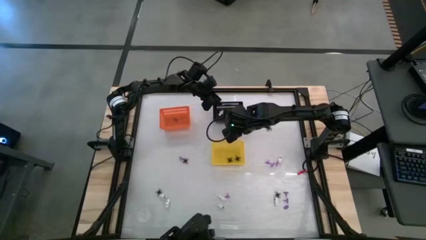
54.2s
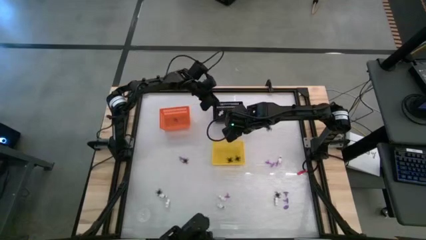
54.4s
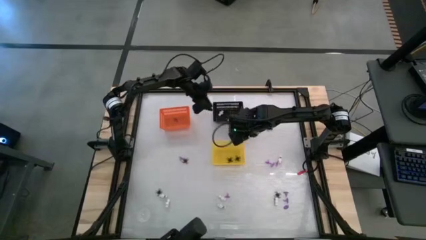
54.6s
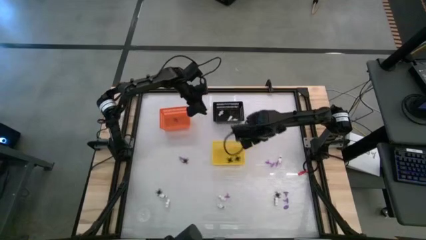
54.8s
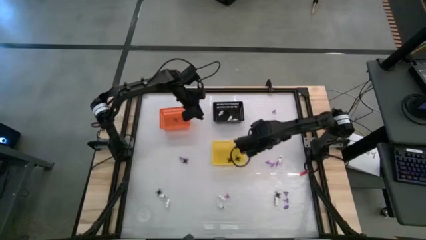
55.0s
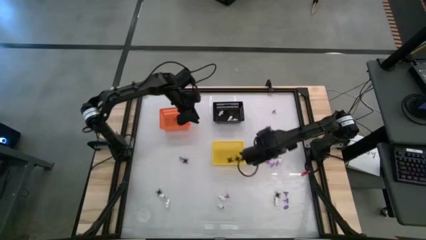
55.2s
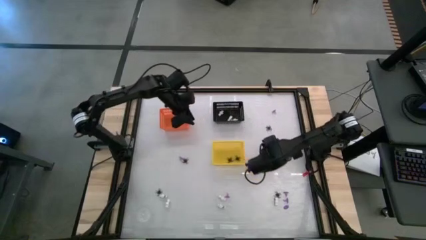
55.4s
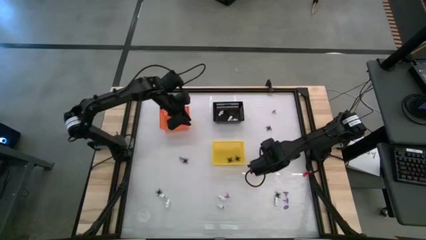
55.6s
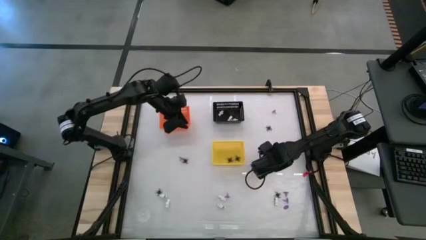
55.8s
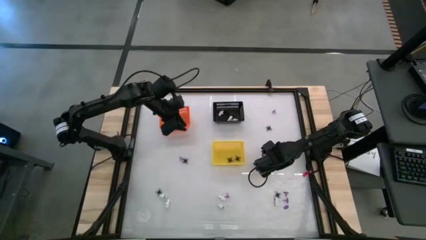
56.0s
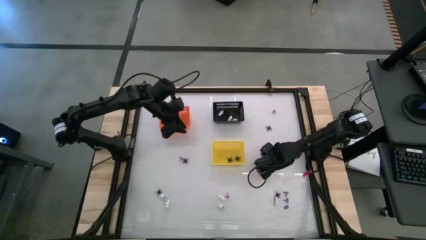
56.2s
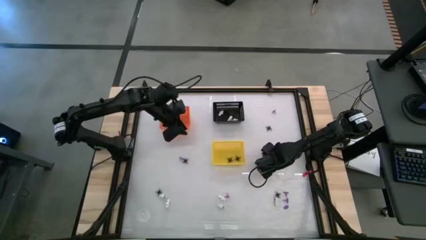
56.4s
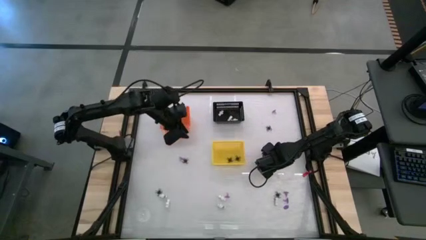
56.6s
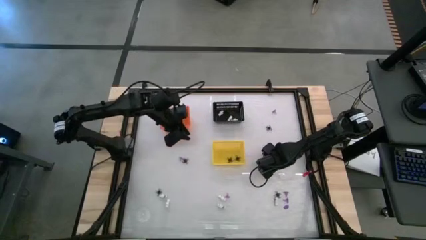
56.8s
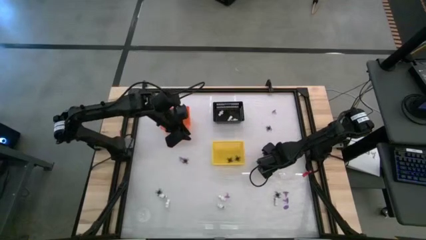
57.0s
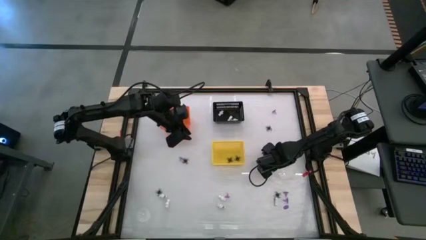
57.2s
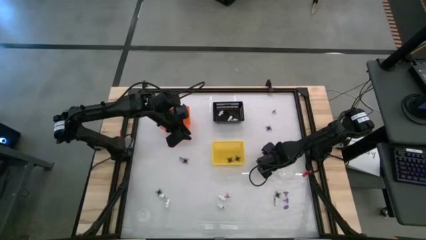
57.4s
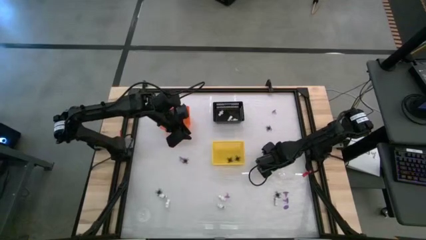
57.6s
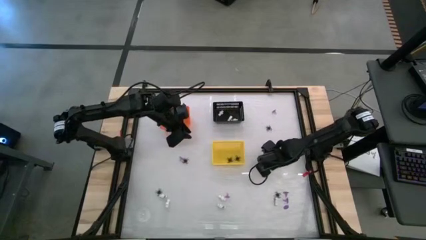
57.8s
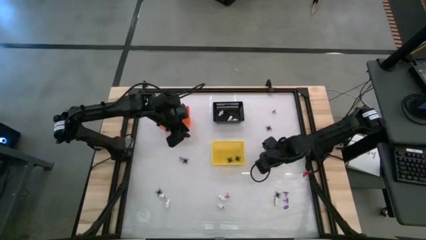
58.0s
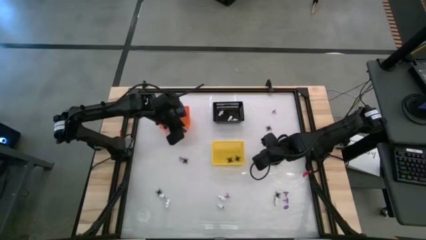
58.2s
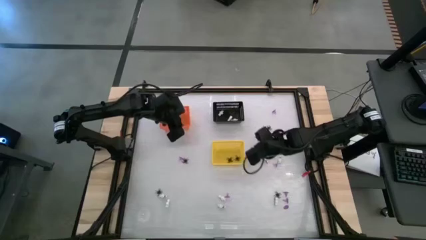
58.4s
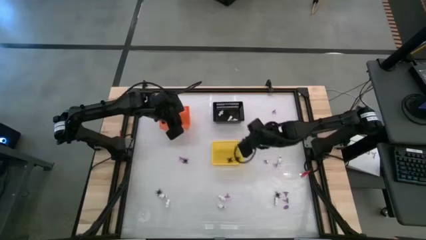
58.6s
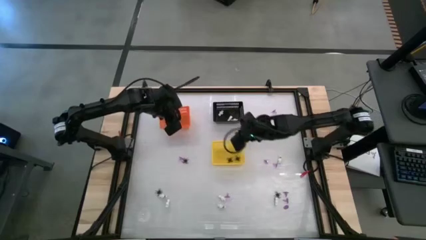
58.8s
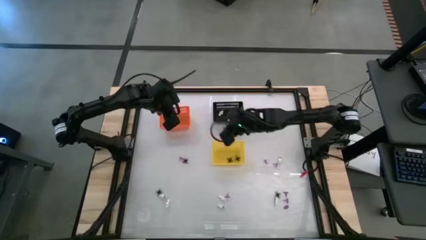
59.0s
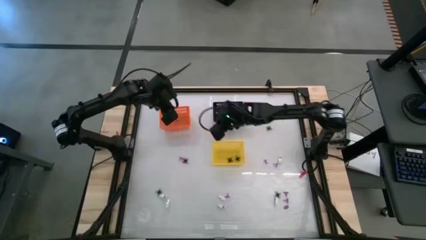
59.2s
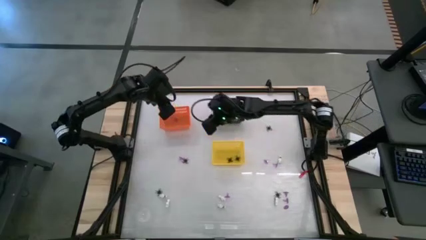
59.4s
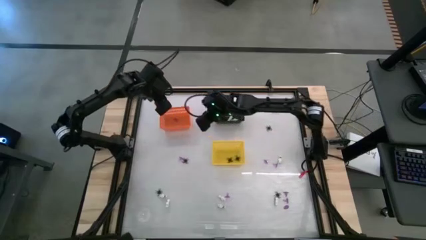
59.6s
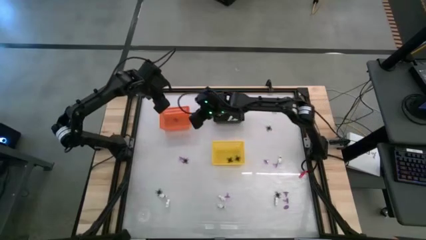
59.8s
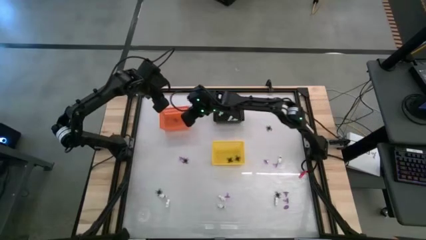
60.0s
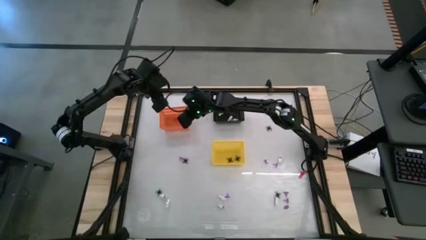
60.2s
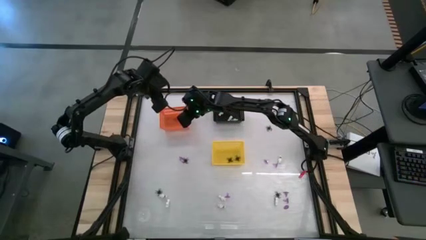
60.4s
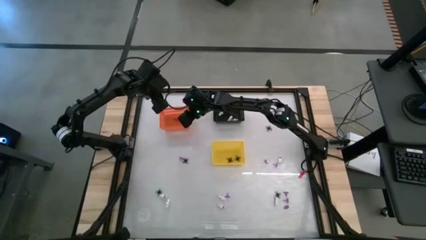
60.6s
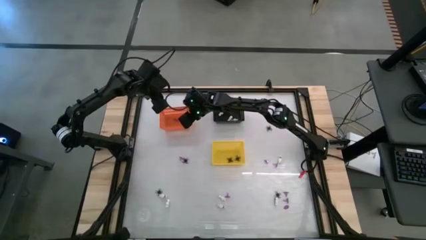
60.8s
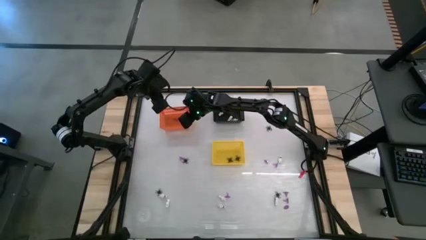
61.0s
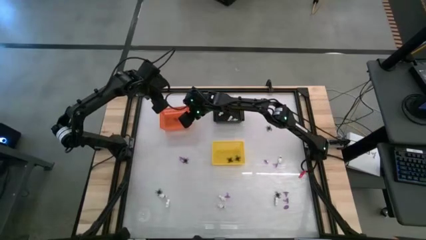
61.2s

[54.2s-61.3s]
Task: Sort Halloween decoration
Put the violet witch hat toy into the orange bin

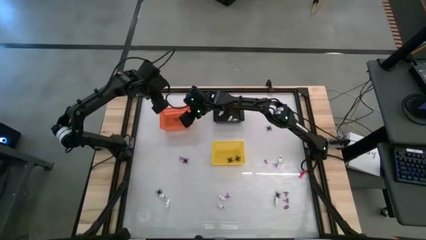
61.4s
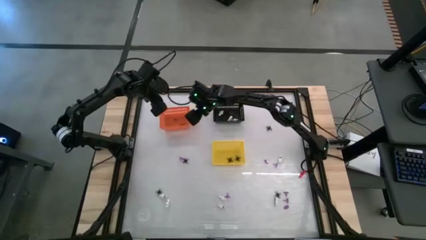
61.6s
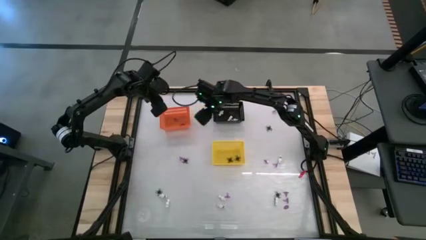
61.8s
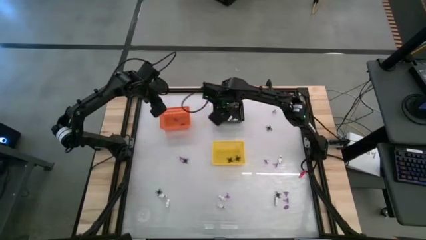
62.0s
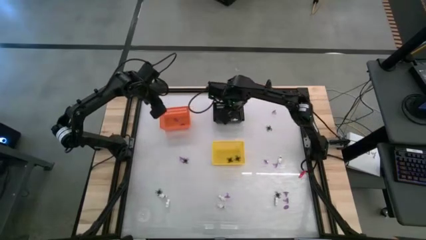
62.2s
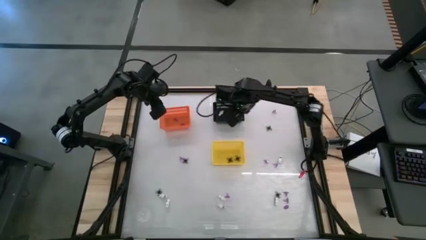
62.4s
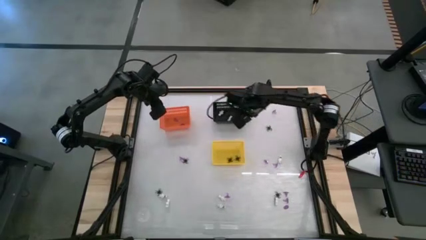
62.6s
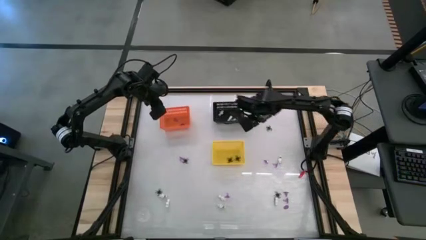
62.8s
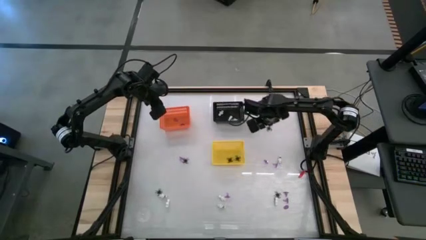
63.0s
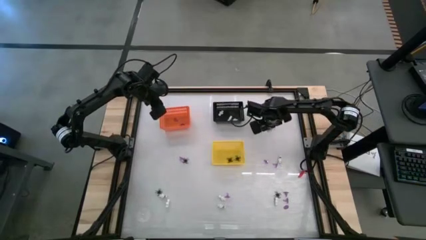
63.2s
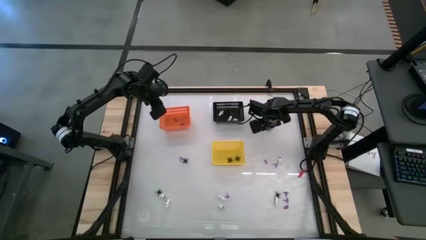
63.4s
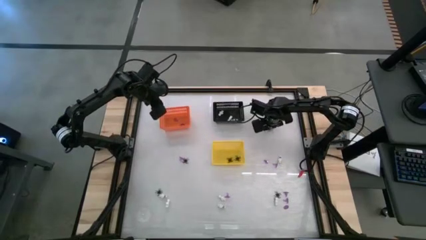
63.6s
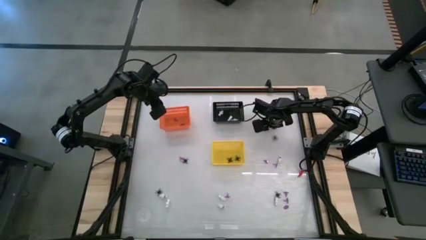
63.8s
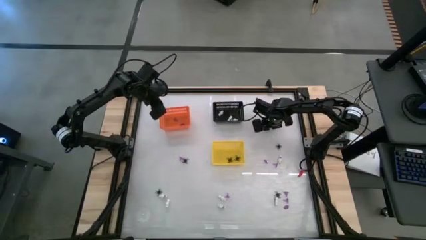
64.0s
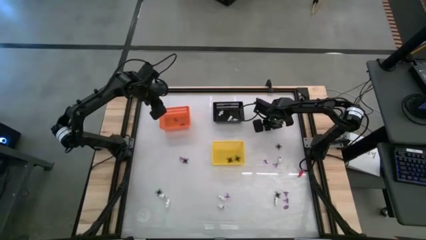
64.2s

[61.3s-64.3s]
Put the black spider toy into the yellow bin

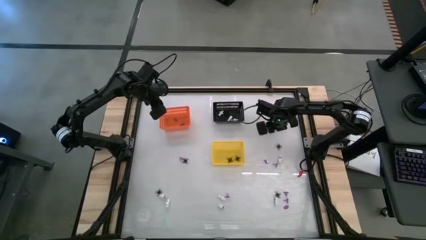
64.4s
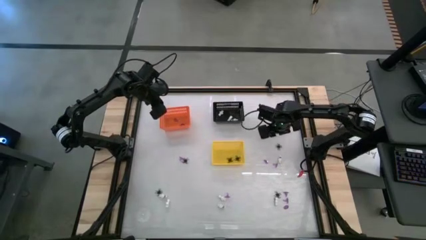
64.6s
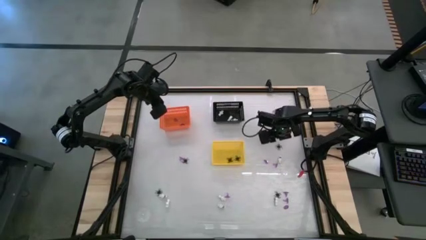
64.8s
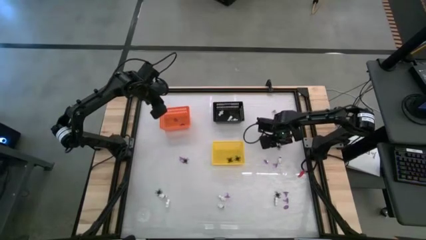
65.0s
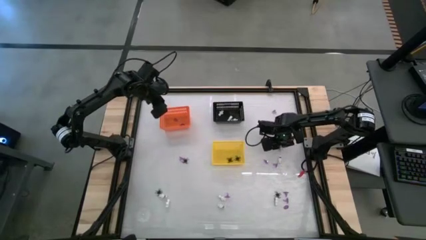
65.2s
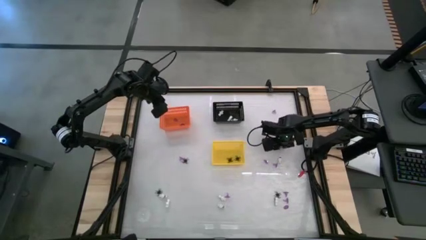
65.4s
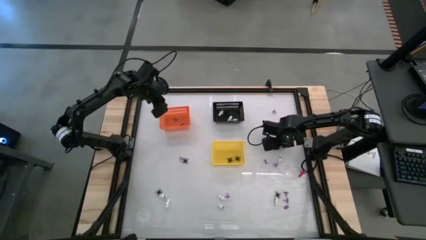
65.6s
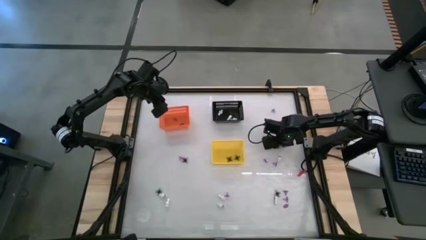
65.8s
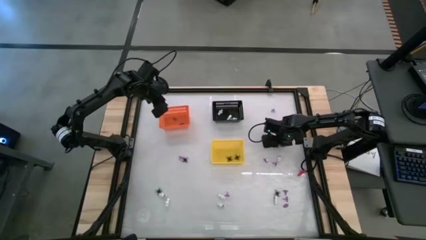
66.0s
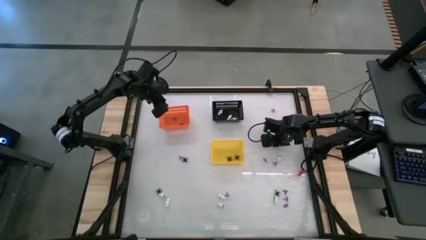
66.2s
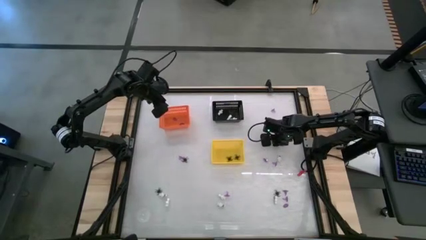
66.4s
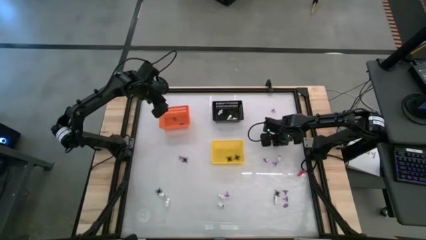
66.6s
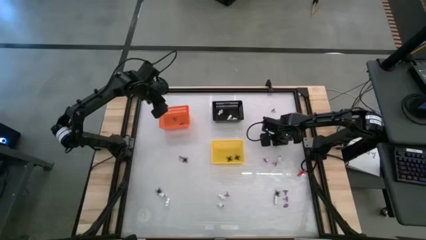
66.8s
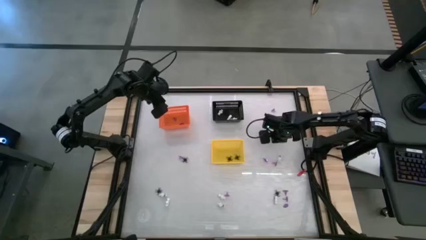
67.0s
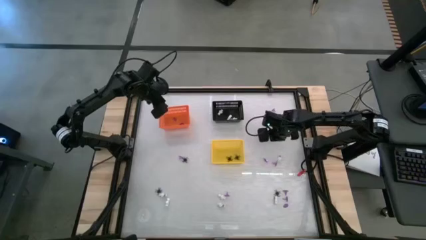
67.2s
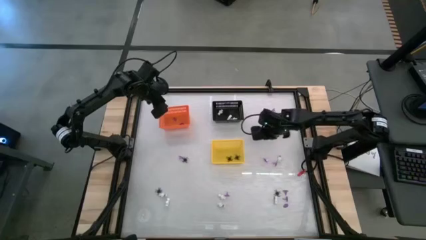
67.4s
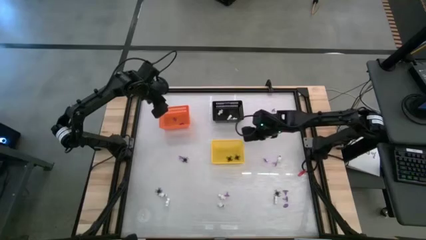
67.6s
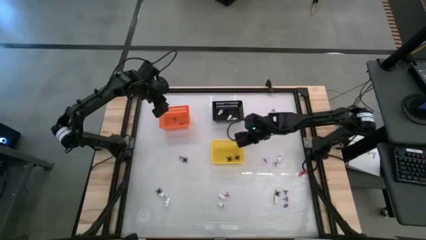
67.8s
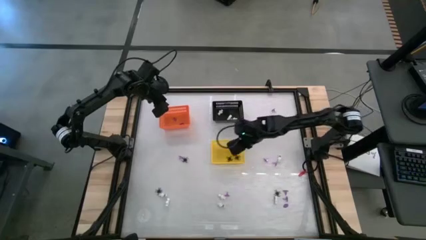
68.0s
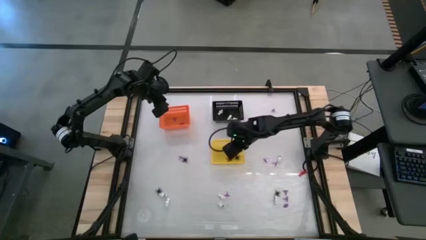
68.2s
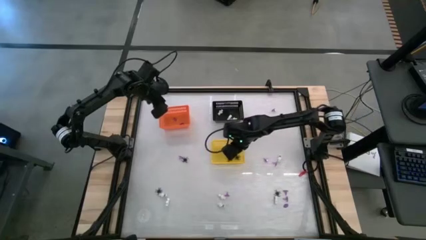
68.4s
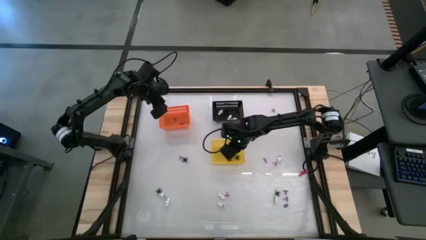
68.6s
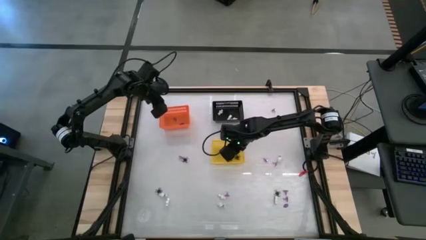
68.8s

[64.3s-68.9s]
Put the black spider toy into the yellow bin

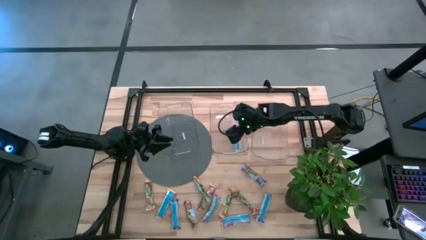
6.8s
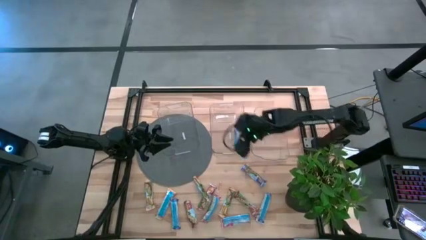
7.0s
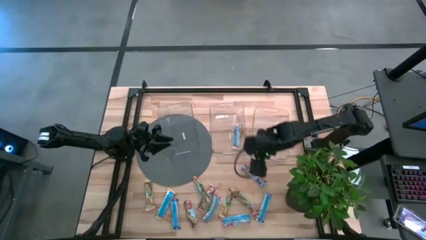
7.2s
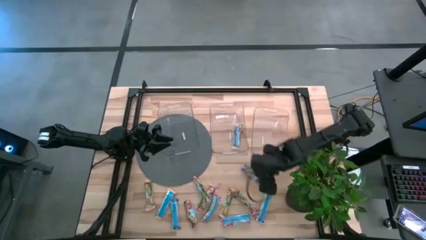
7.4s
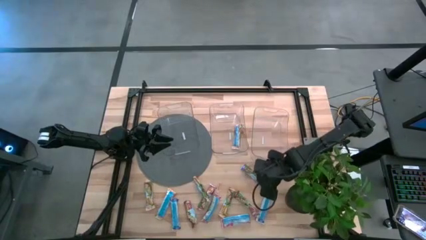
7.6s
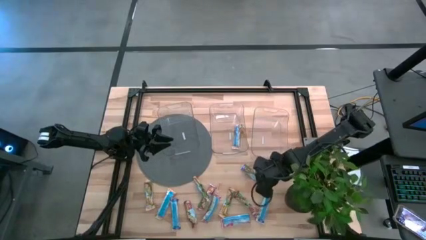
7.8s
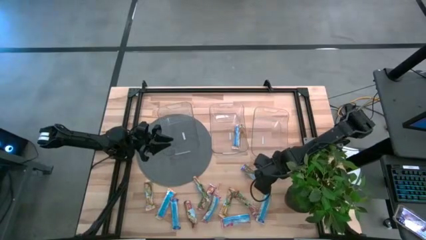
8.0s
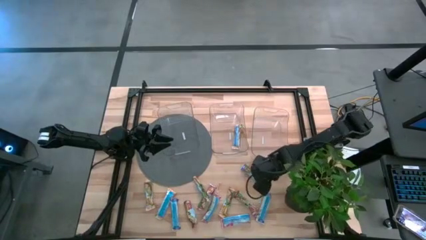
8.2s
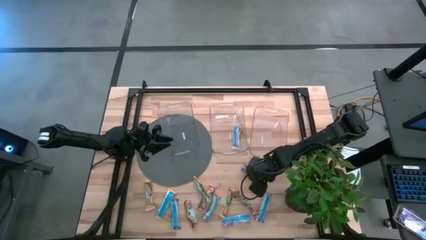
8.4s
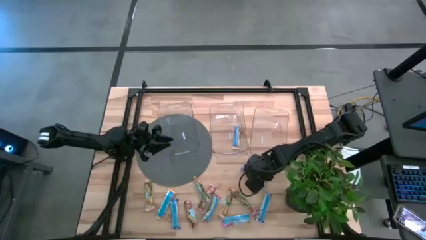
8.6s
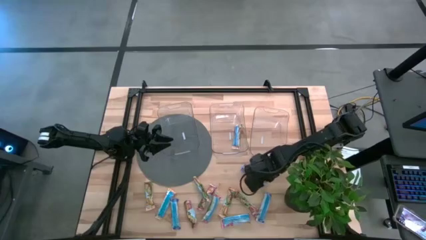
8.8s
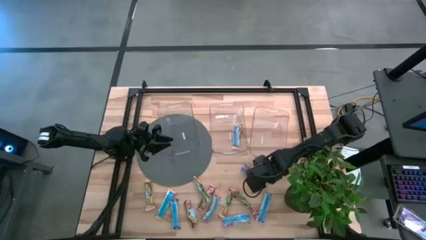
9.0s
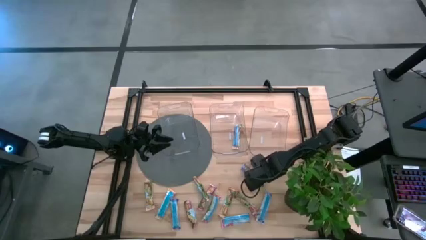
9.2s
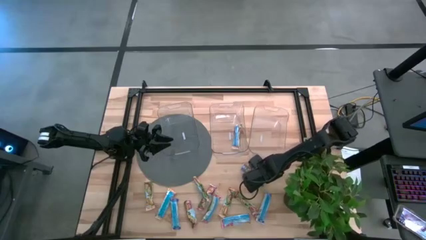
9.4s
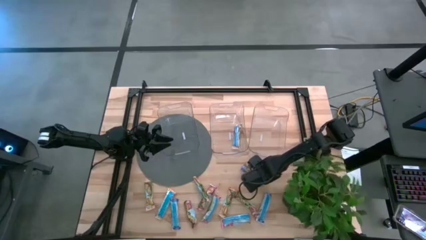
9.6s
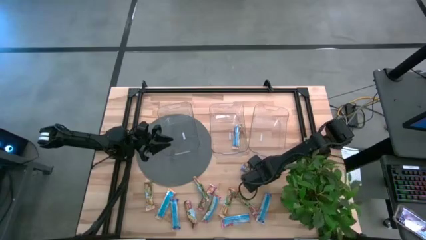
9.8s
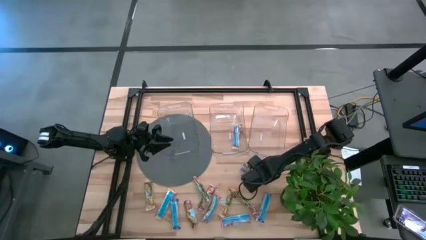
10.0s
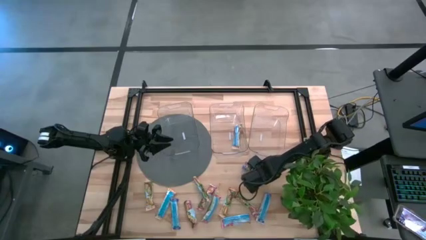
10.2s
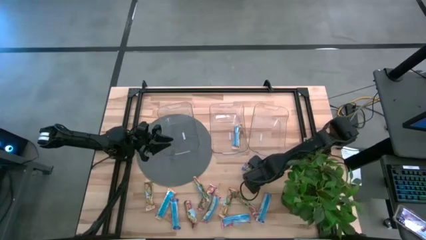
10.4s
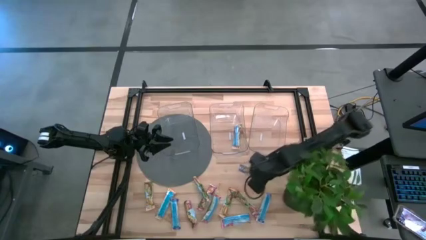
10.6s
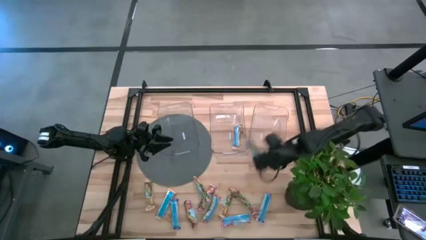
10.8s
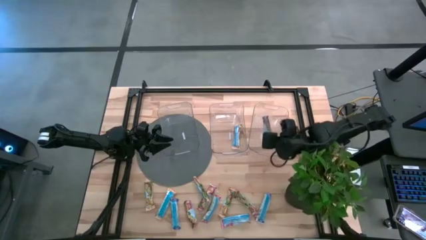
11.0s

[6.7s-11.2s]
Task: Pick and place Granola Bars by type
Put the blue granola bar into the right transparent bin
